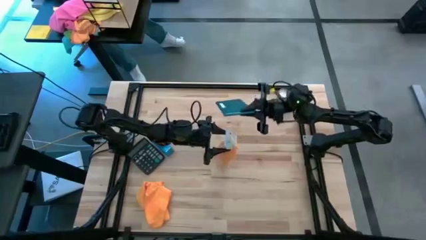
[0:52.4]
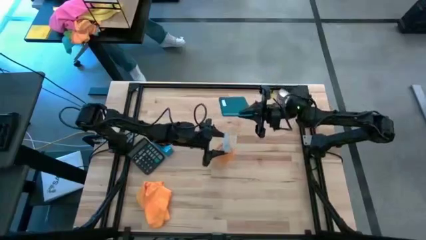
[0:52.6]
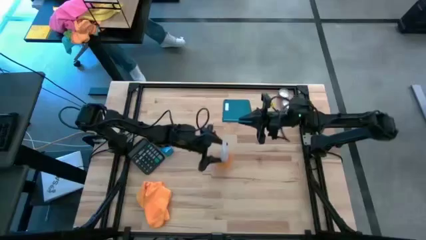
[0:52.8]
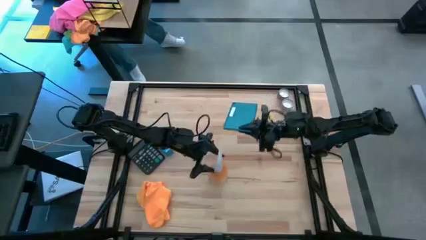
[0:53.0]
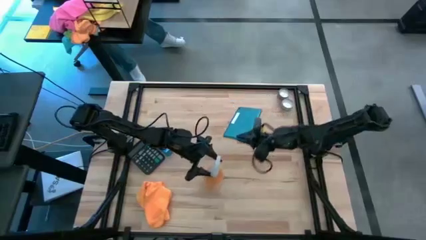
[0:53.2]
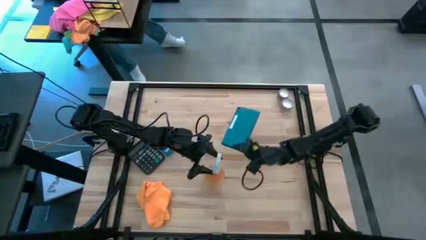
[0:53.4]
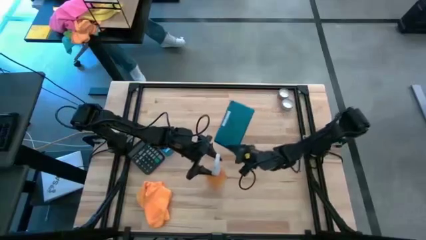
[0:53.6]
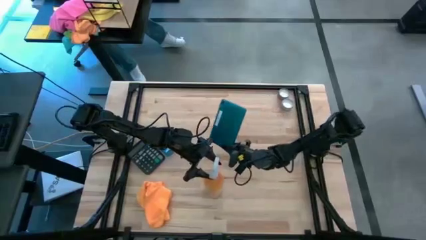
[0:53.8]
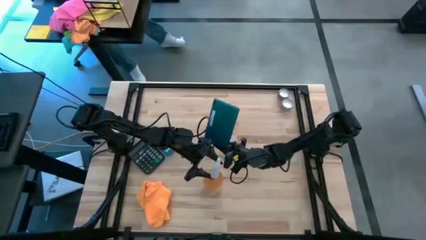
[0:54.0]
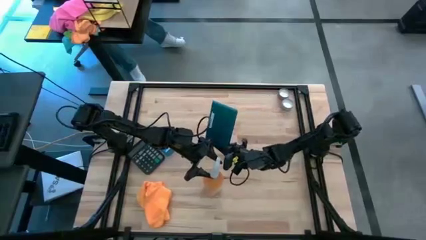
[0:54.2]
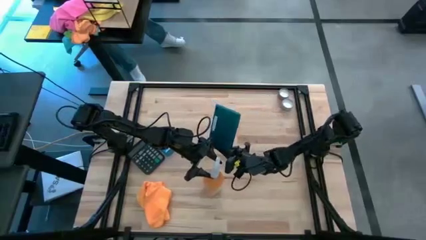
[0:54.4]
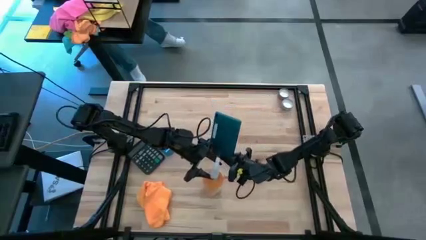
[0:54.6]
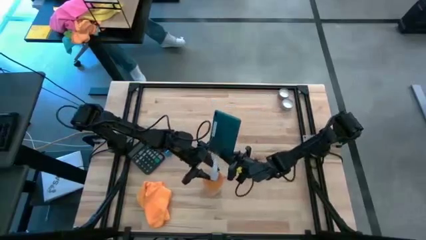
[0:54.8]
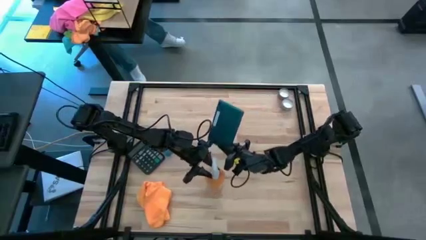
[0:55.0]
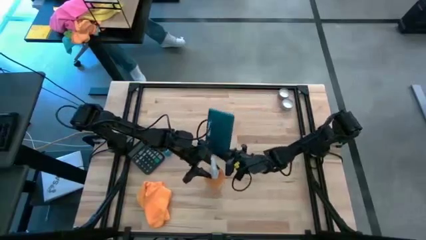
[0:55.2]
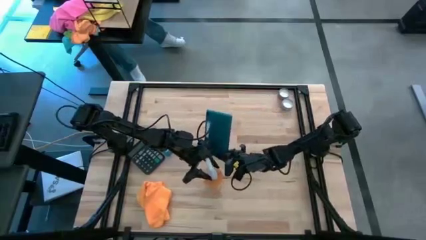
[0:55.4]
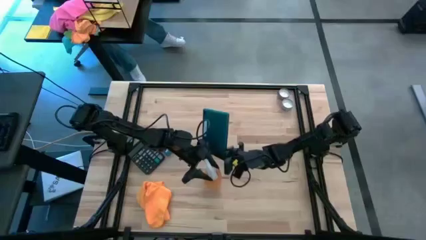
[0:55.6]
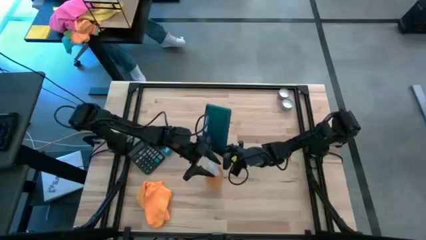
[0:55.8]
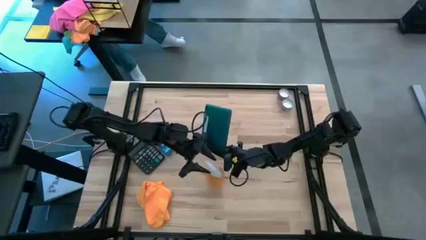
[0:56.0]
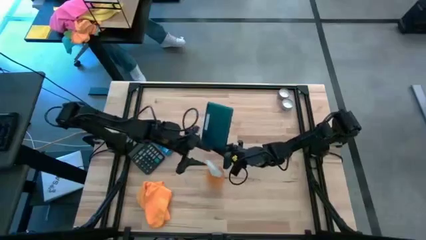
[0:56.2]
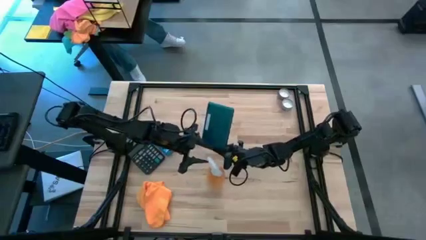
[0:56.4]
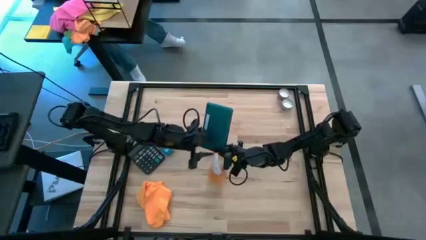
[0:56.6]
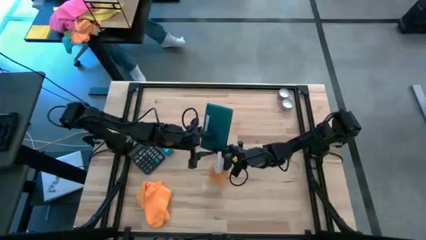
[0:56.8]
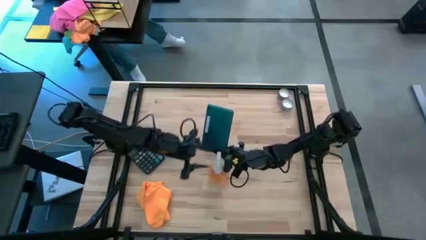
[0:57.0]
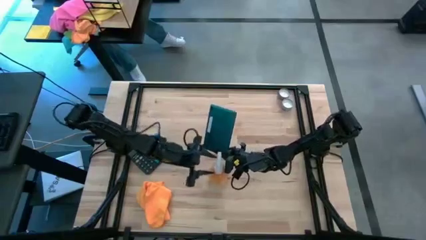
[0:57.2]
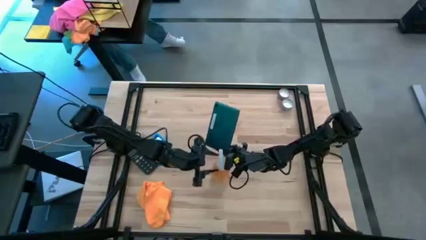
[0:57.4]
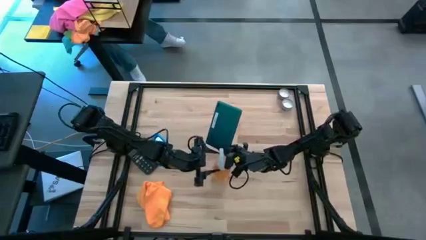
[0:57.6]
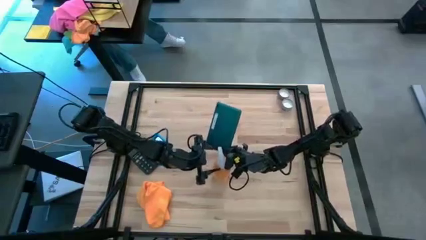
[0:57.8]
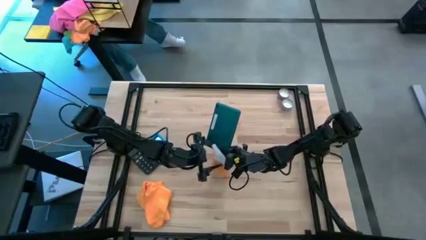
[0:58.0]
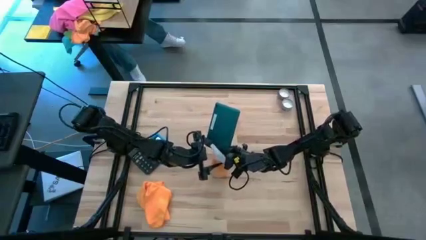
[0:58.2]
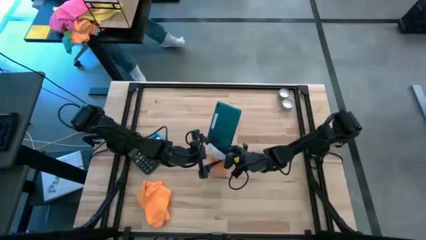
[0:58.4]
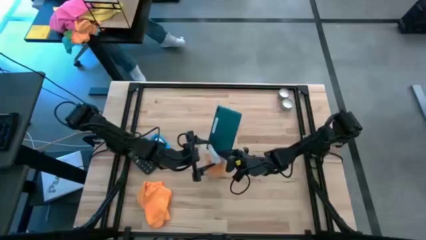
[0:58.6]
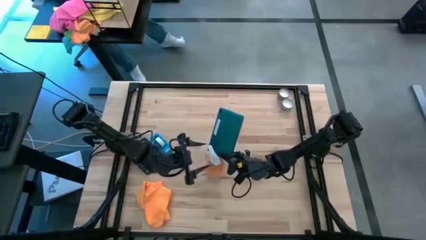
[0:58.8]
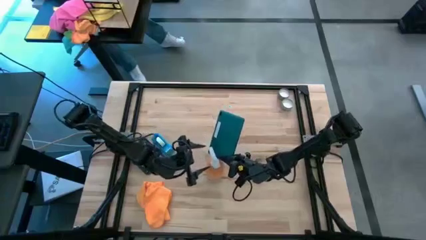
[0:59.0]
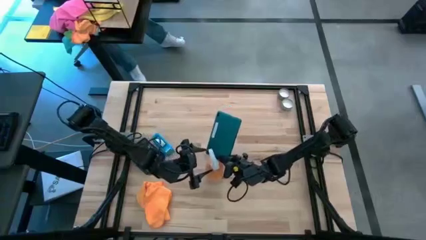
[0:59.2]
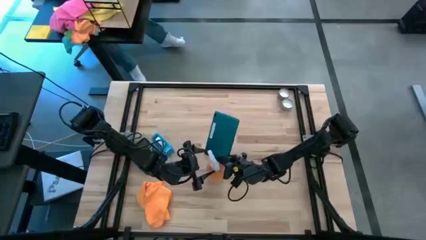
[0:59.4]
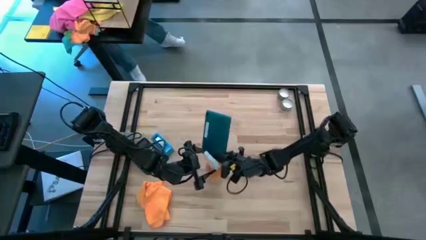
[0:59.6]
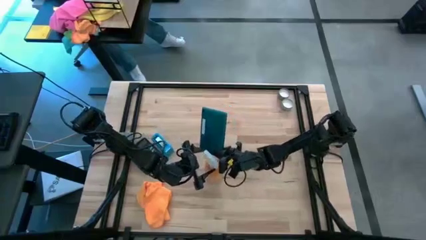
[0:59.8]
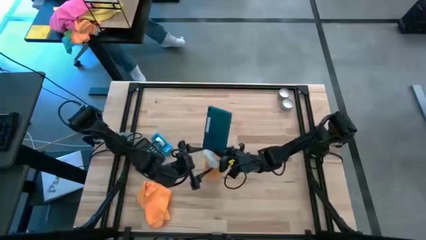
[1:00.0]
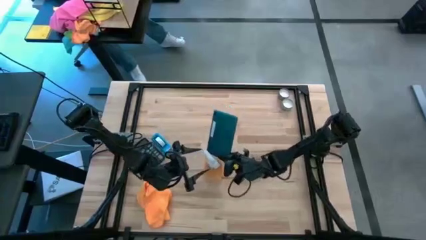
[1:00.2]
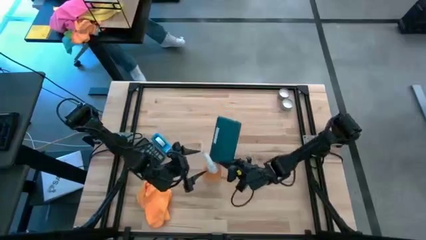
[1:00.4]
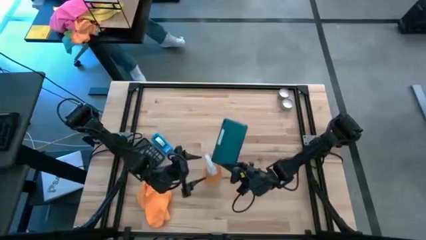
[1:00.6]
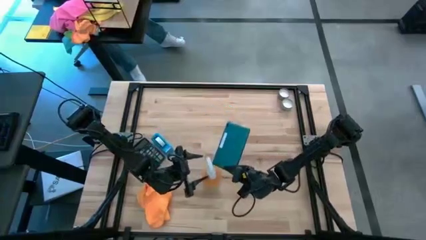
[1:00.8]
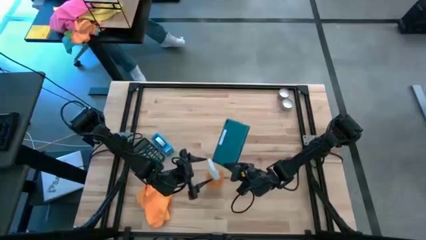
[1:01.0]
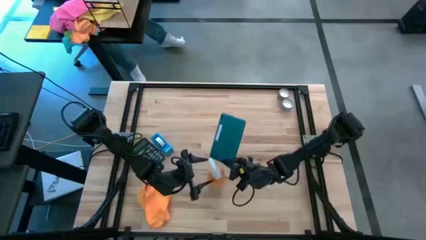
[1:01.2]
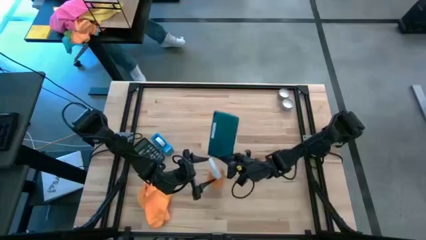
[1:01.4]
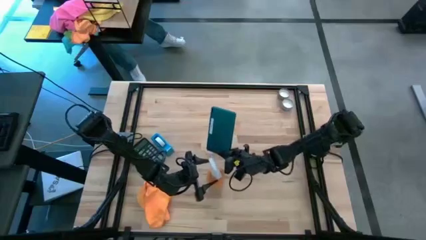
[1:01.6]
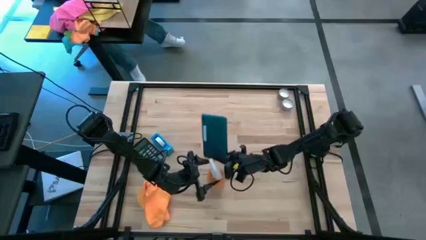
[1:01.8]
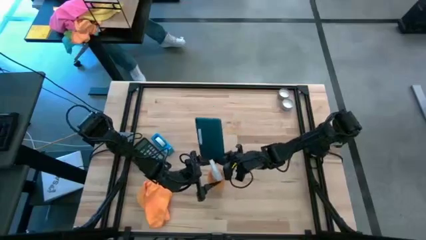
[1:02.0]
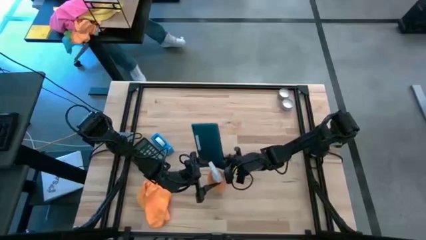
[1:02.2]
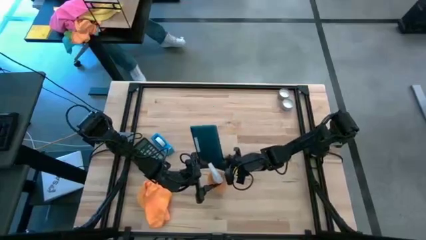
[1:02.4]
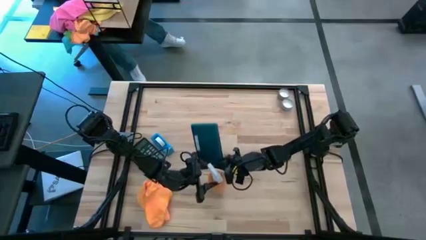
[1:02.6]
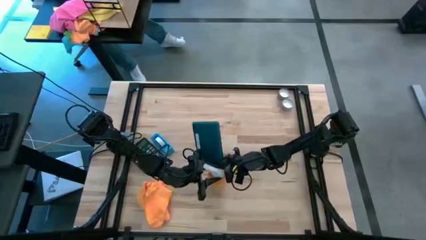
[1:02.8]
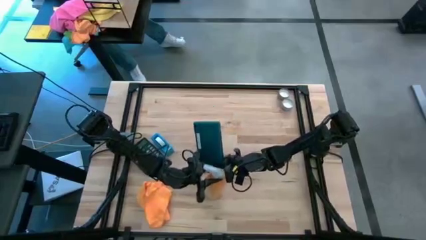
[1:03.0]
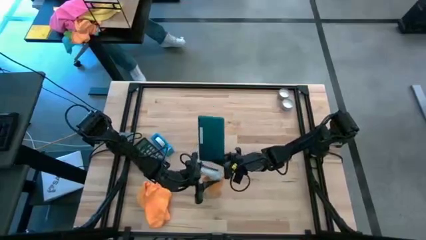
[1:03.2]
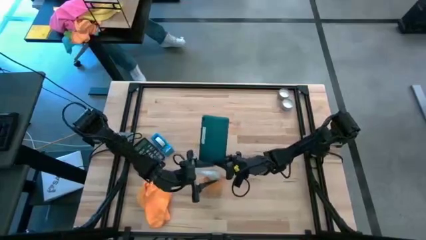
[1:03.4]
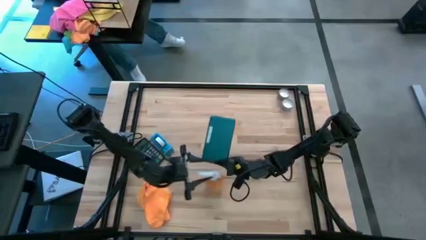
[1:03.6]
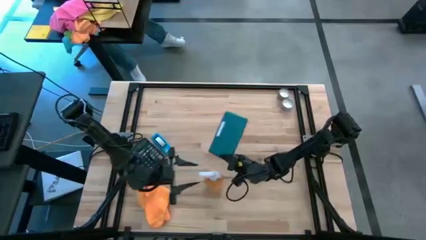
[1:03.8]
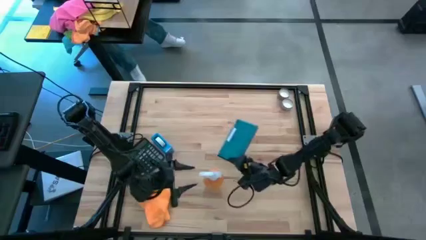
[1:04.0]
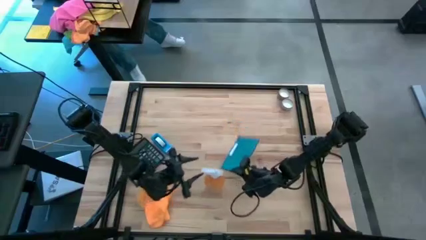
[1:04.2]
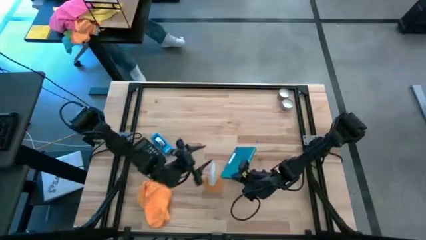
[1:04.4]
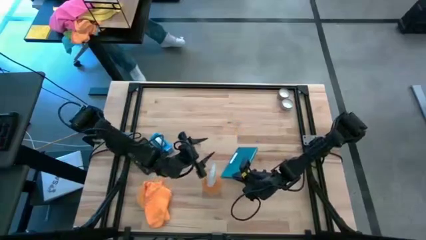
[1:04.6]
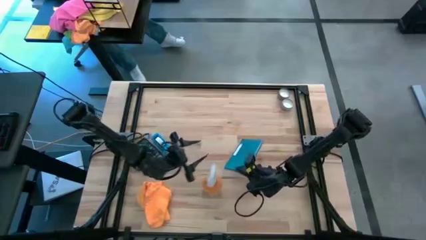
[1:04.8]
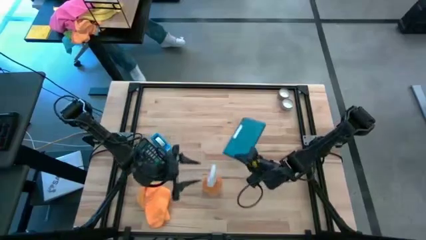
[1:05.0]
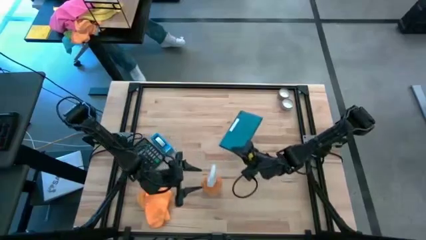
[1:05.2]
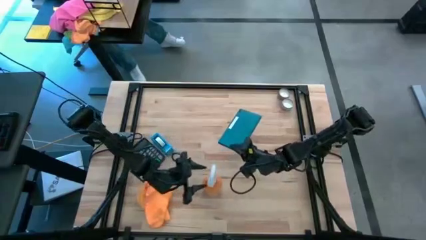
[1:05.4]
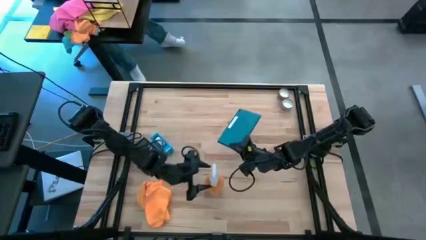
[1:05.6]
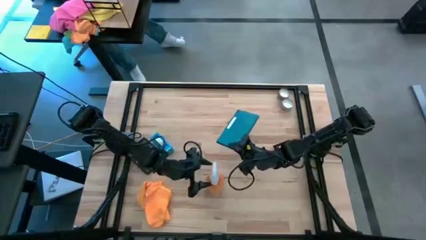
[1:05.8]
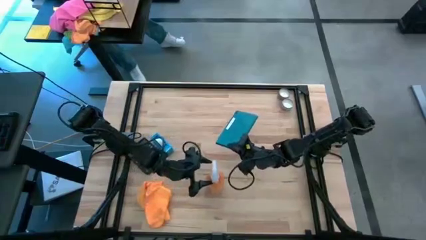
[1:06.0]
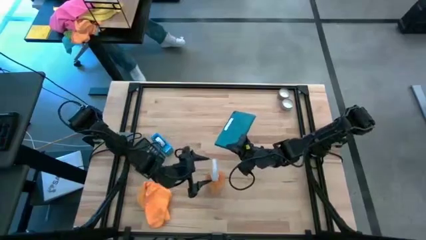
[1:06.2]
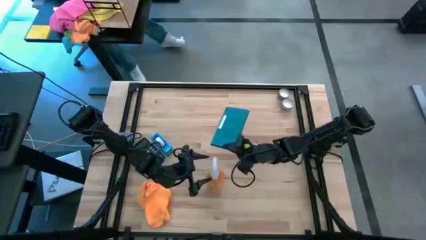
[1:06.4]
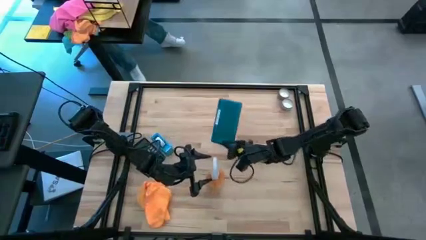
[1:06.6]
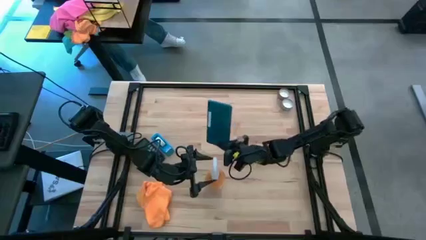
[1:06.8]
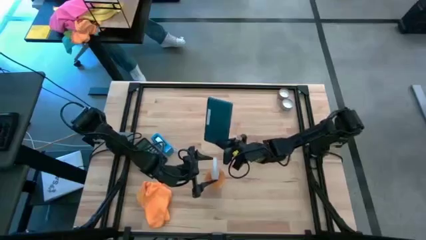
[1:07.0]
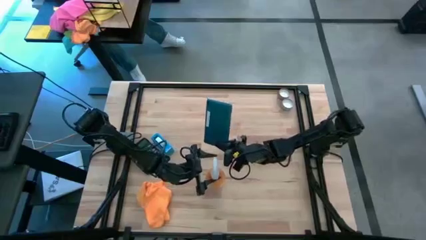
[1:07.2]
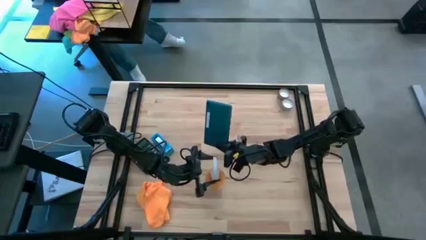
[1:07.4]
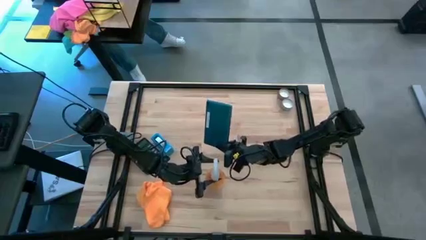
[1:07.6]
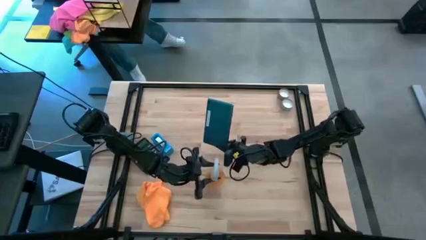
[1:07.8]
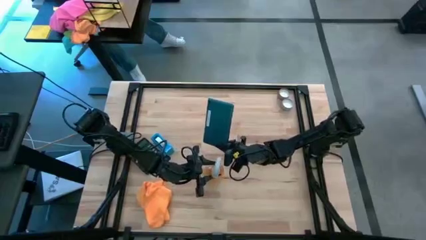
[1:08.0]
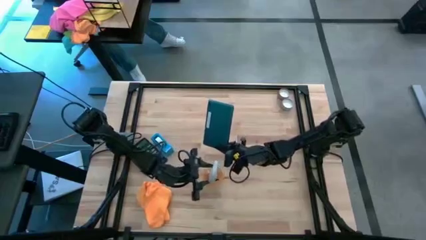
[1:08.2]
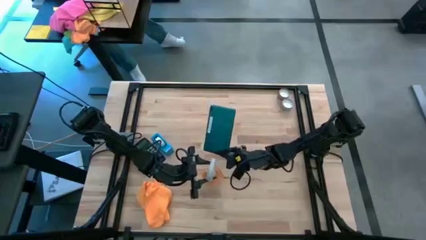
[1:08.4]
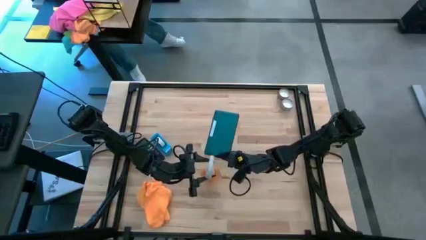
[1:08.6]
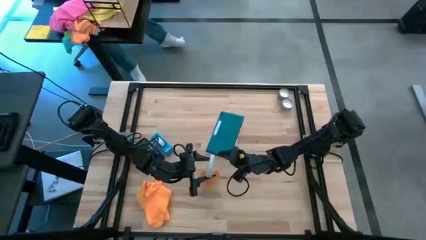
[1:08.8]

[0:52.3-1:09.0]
Task: Apply microfiber cloth
Spray the blue phone using the orange spray bottle
